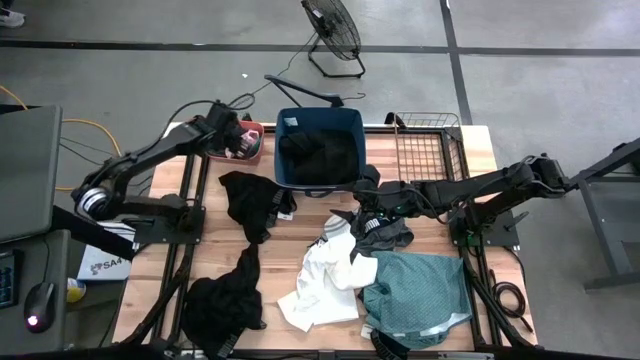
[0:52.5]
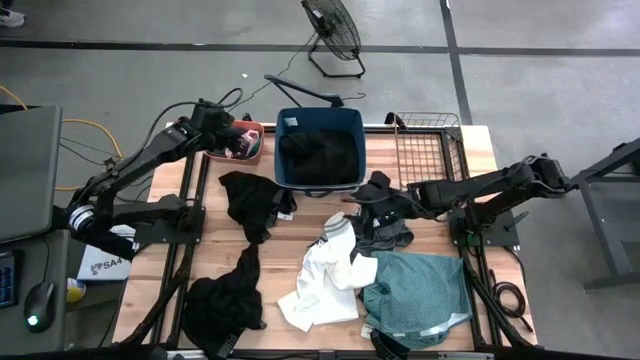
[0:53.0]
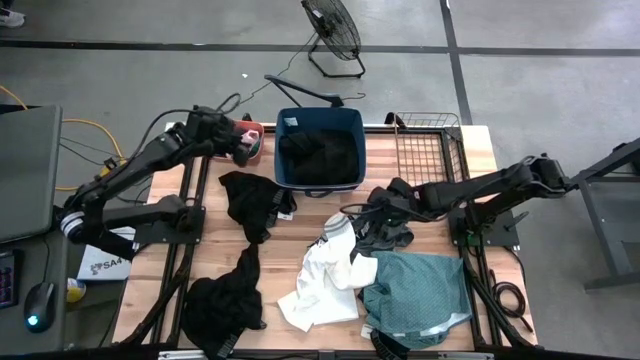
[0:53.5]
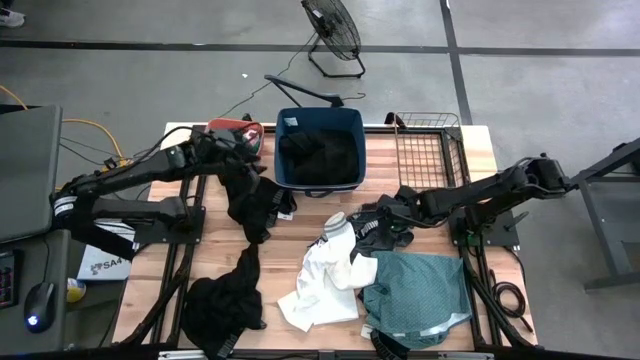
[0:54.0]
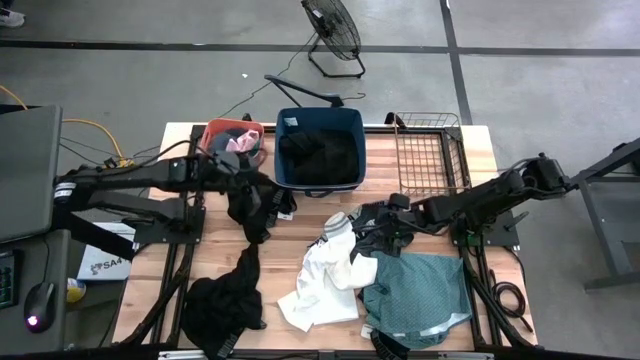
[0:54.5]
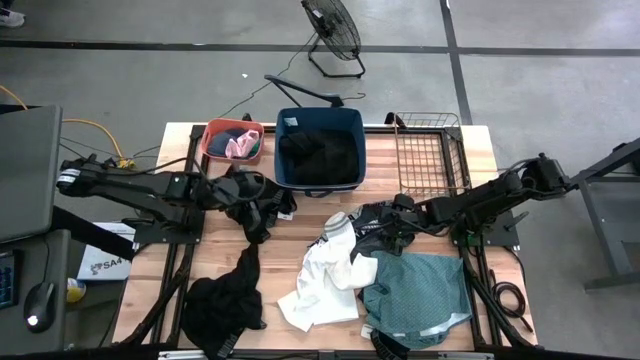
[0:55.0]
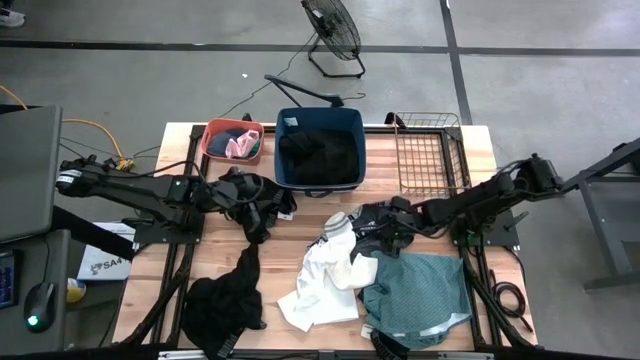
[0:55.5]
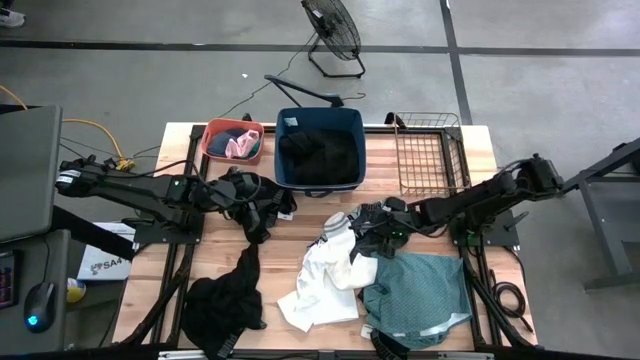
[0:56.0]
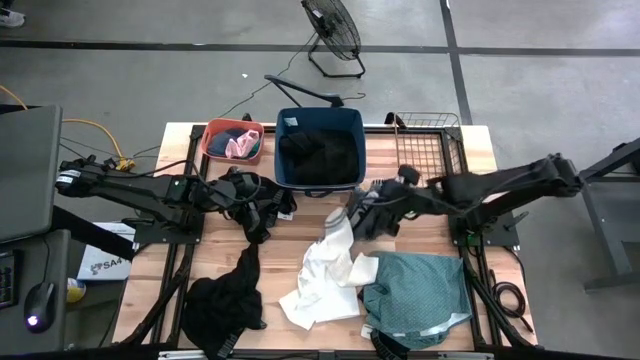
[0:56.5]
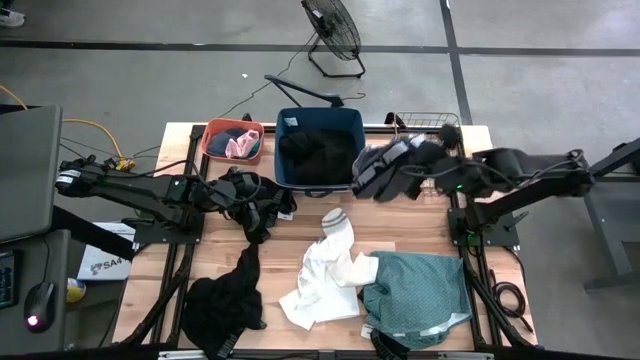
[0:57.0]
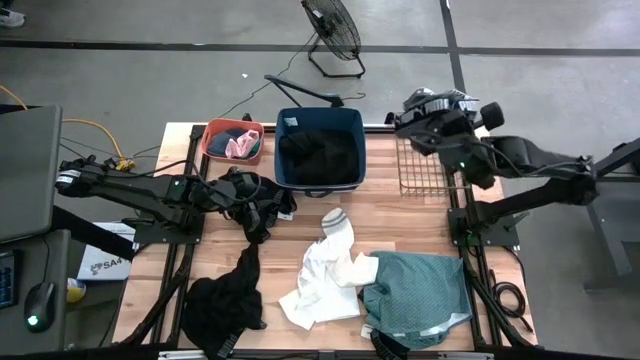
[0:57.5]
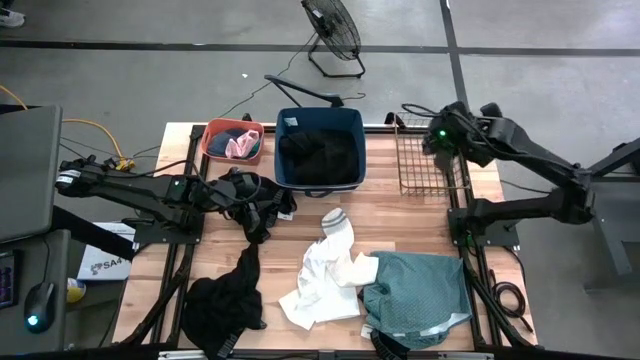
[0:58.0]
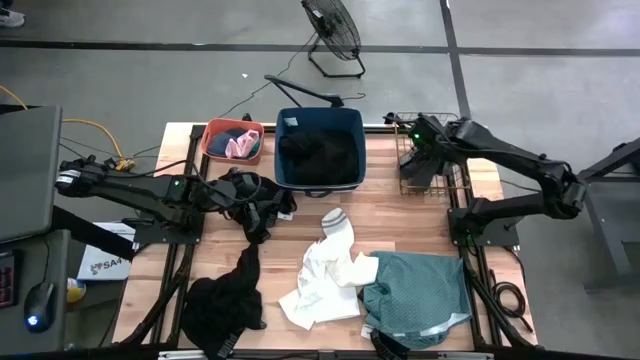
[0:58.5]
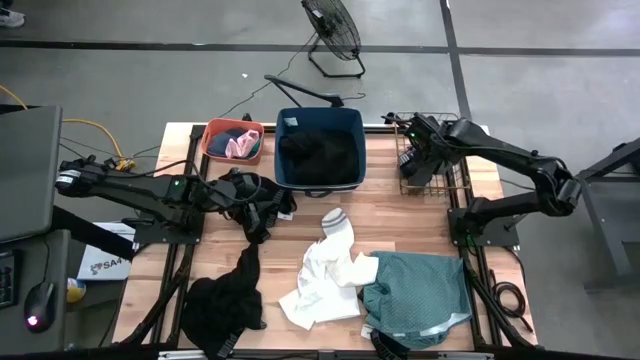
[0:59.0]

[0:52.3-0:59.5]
Task: Pick & Place Cloths
Put the gray boxer into the wire basket

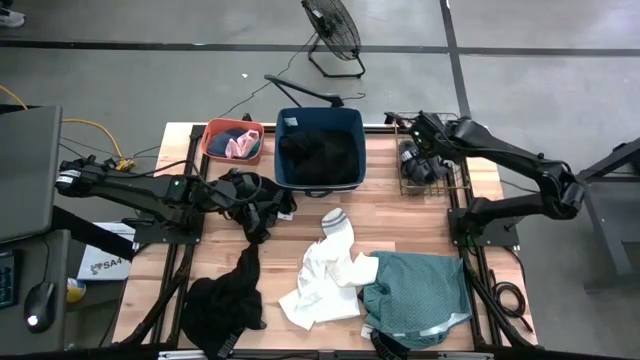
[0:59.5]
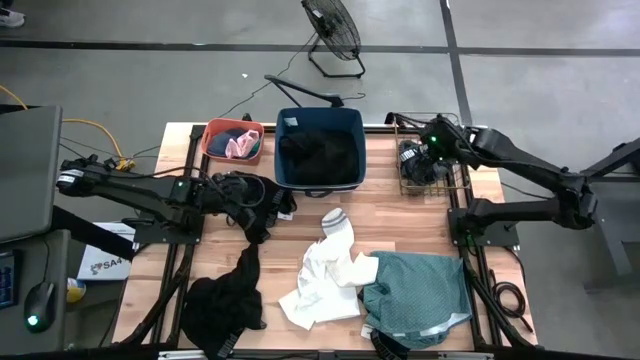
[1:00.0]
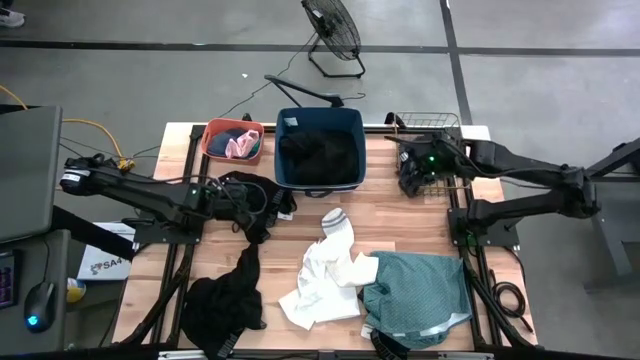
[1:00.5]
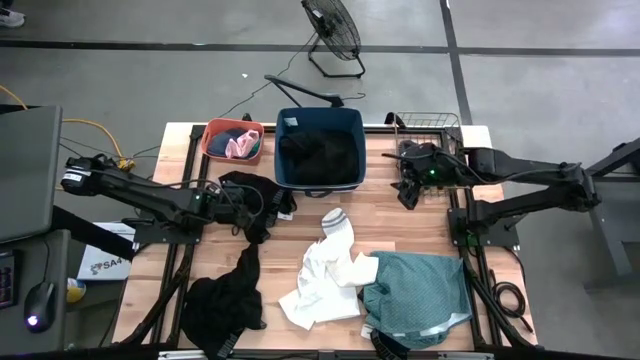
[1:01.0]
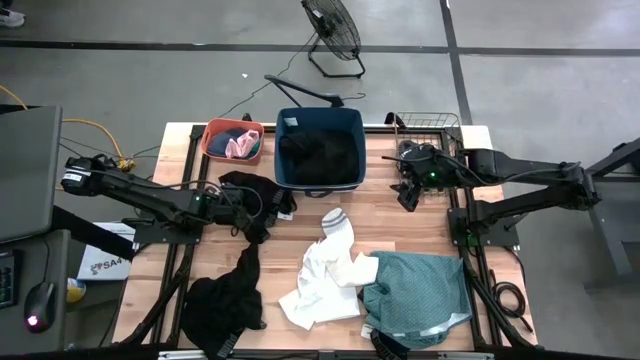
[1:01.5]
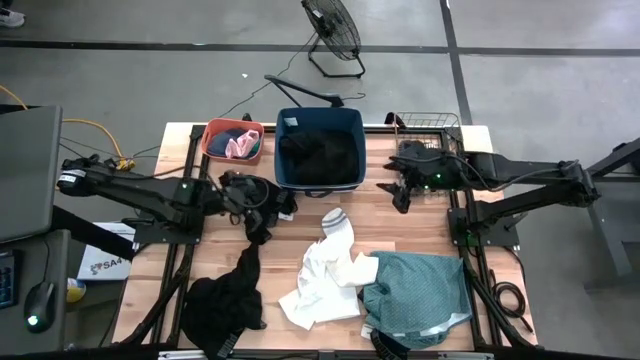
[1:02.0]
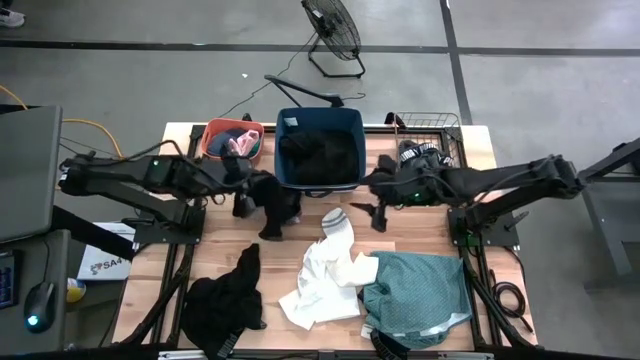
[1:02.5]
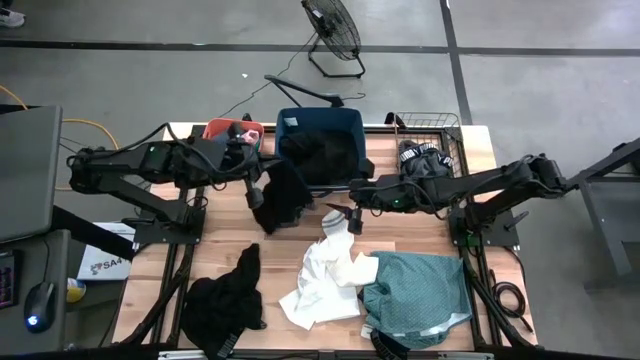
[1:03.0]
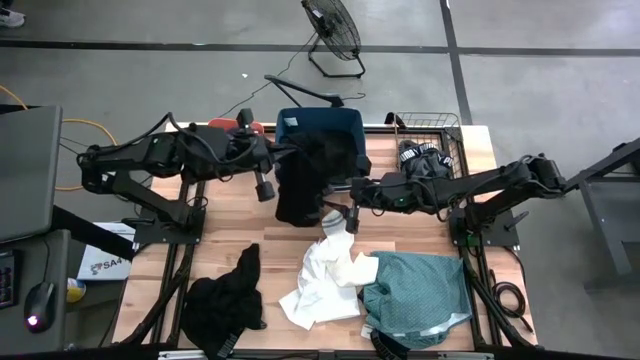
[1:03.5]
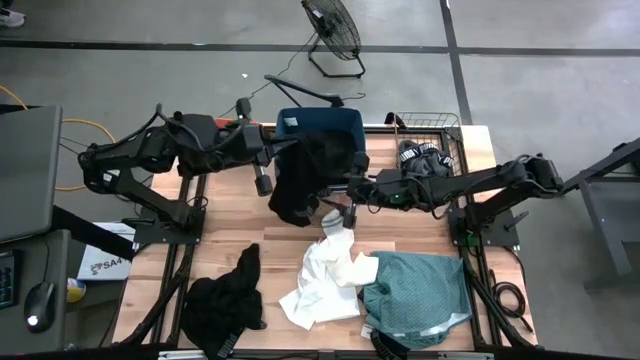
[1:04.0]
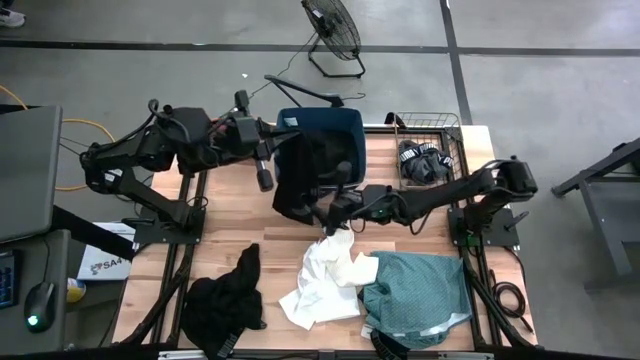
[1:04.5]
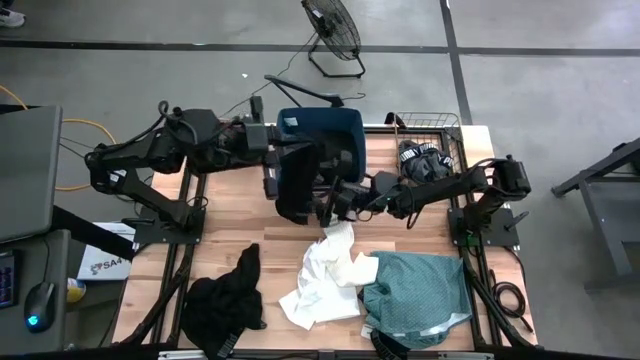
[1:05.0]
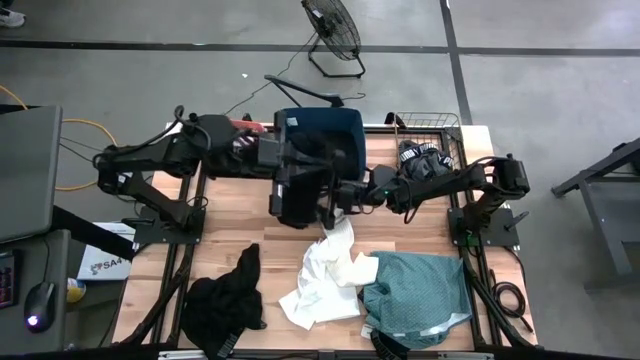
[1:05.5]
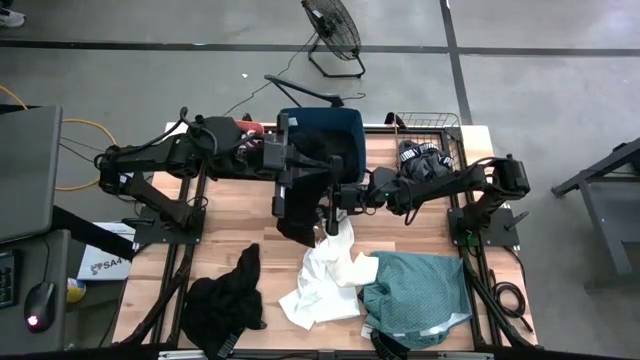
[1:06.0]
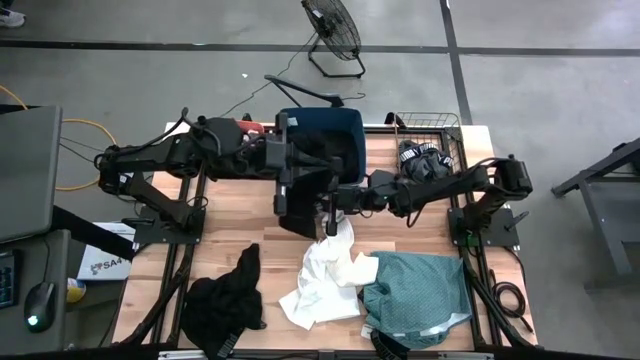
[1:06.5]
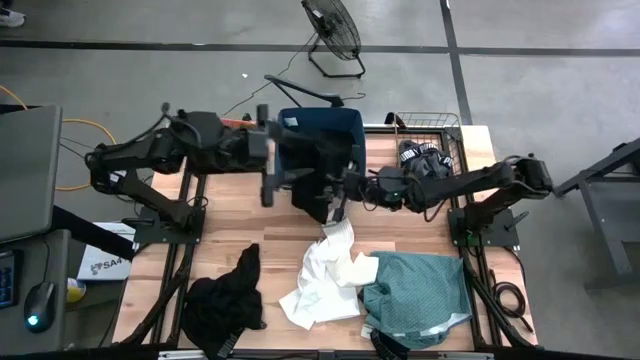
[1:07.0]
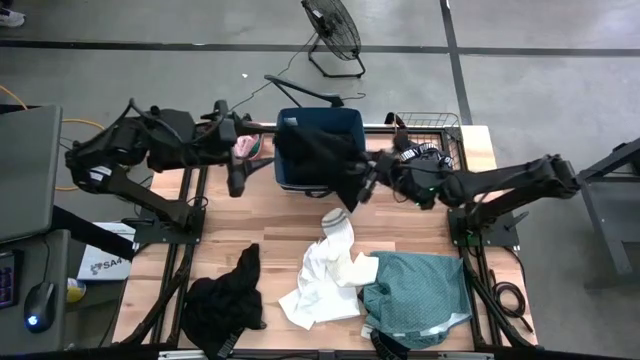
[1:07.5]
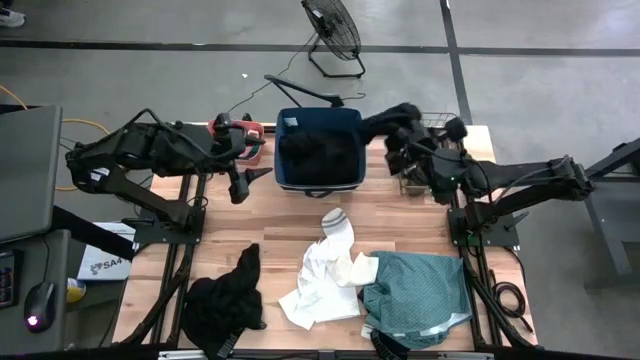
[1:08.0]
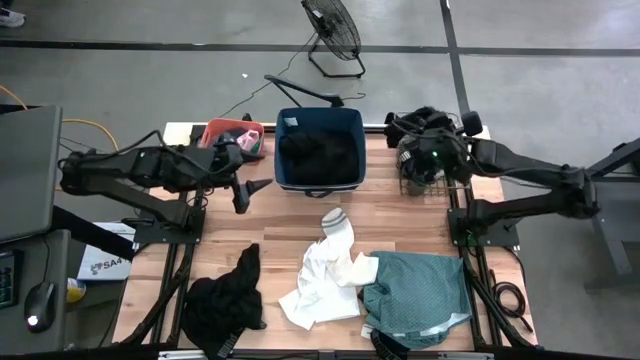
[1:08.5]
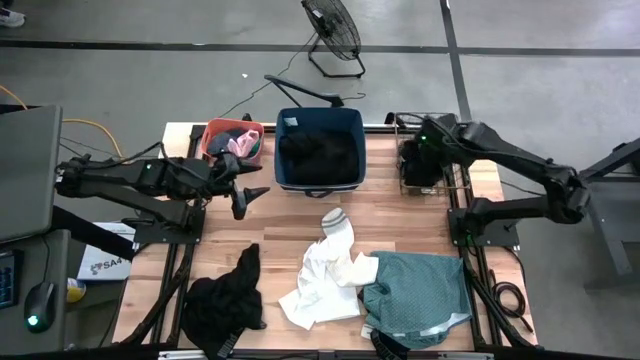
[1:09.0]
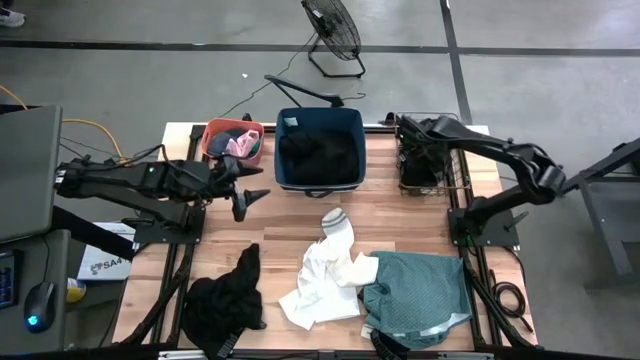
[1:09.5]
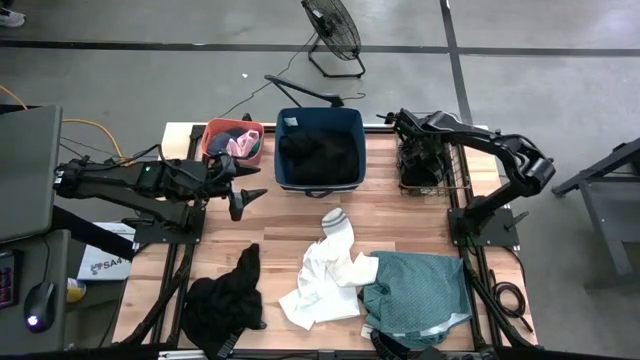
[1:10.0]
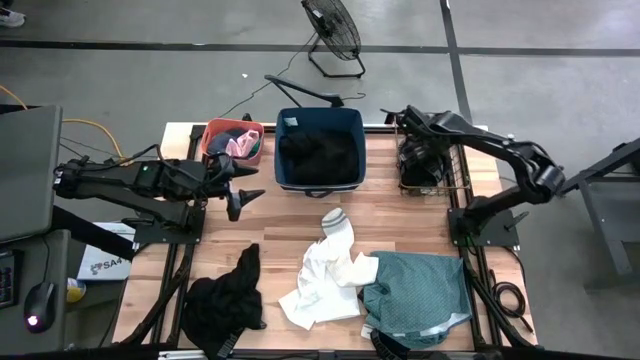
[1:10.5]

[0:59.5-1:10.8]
Put the top black boxer into the wire basket

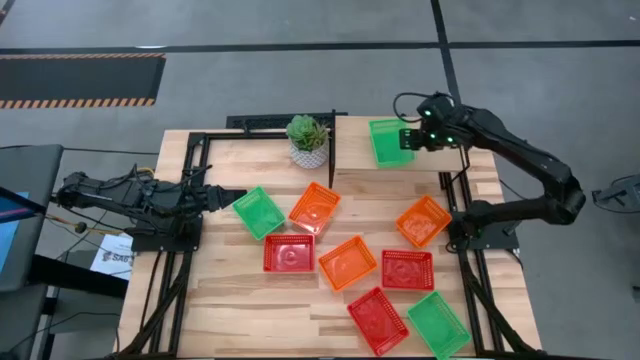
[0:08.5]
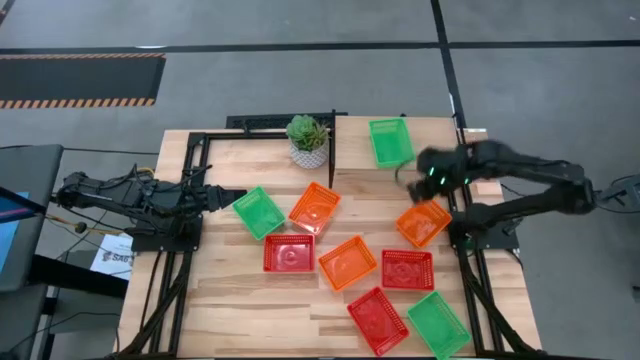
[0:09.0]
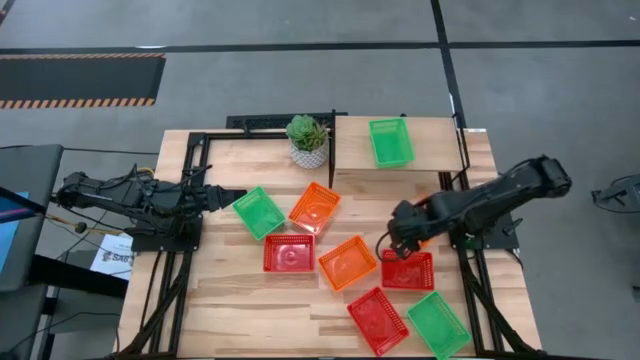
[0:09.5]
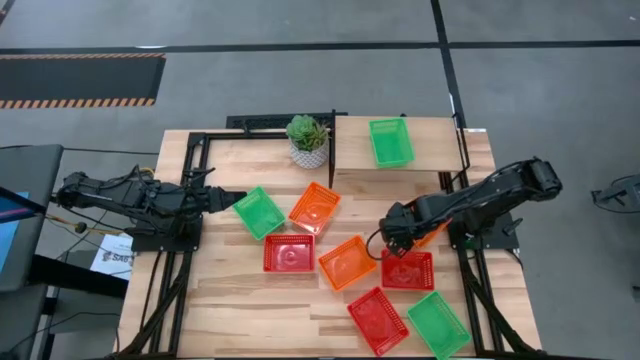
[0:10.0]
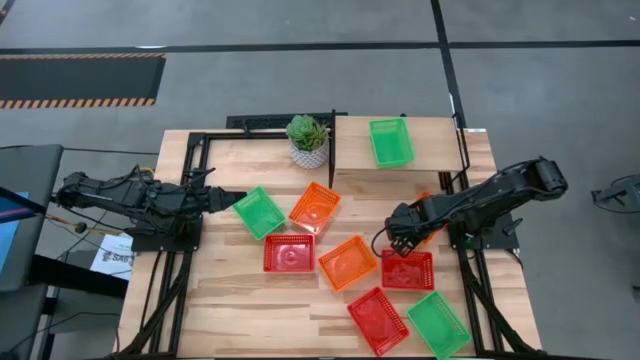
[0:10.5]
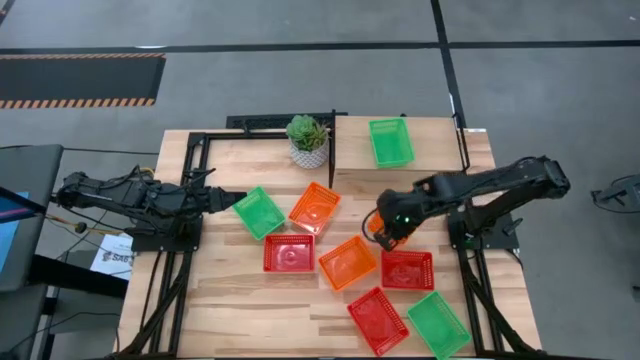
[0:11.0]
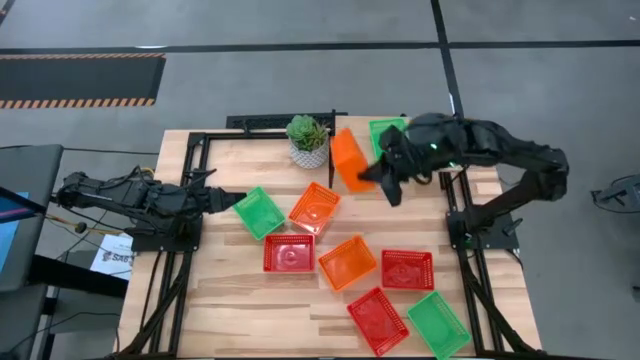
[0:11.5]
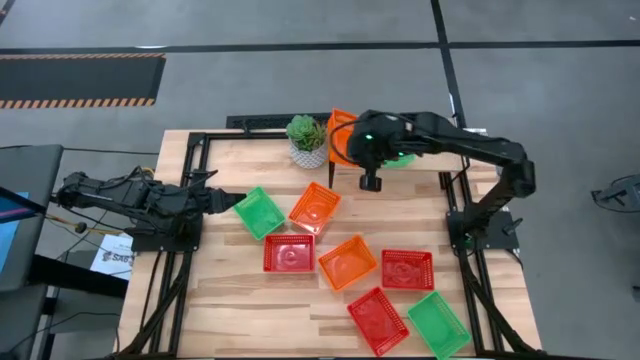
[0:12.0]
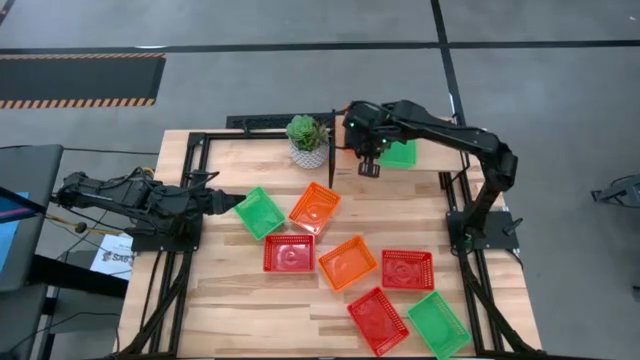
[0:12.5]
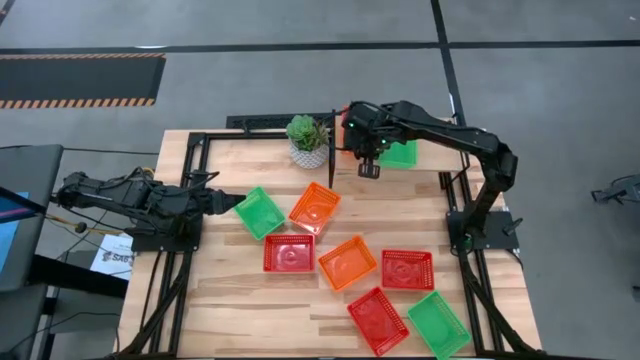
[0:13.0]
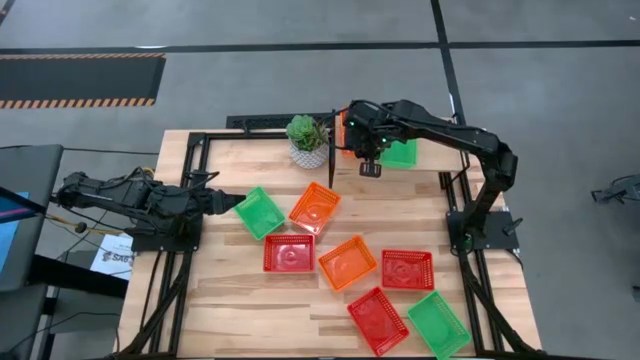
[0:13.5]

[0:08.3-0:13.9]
Task: Stack baskets on shelf by color
Put the top right orange bin on the shelf
